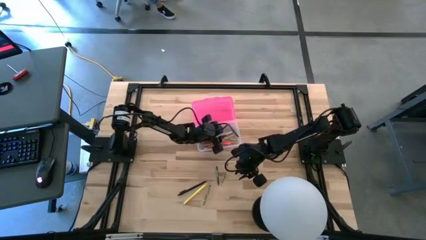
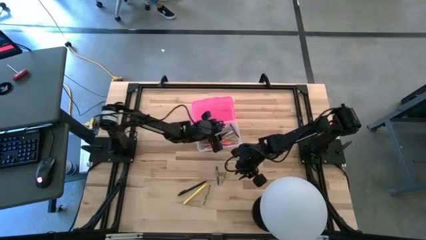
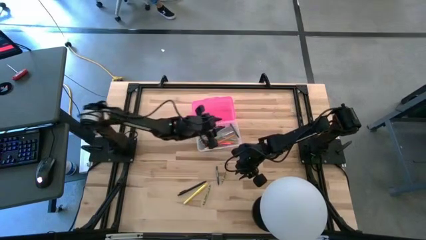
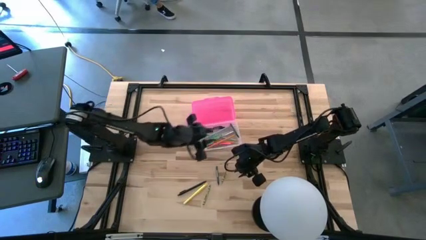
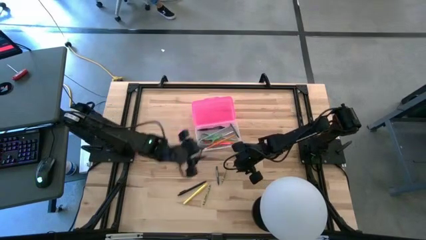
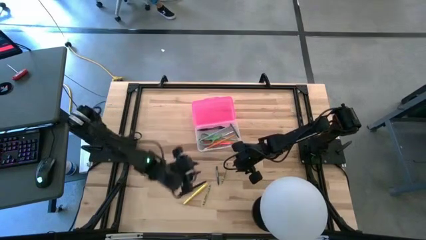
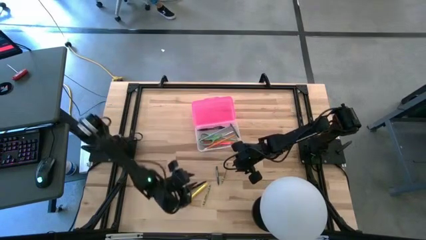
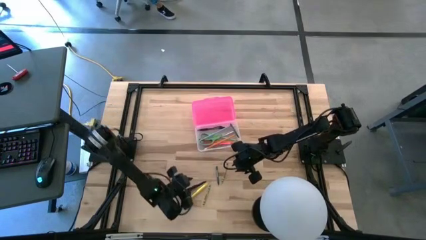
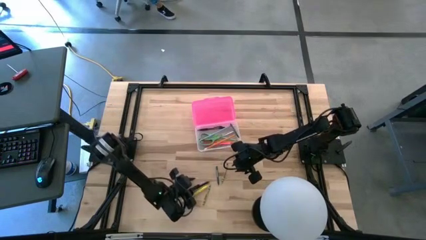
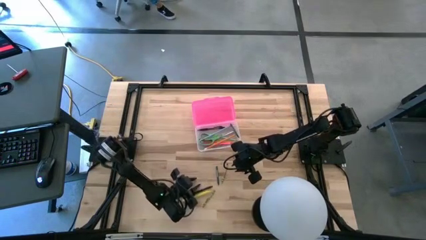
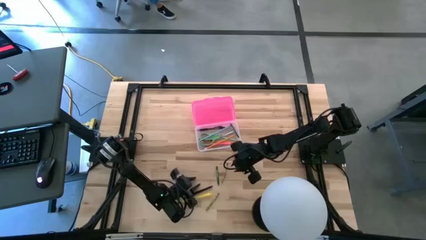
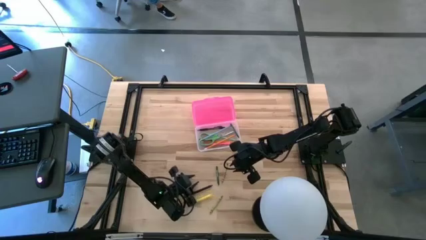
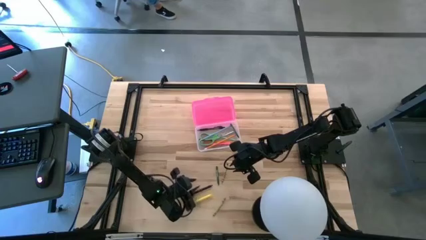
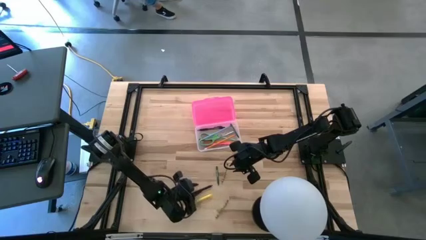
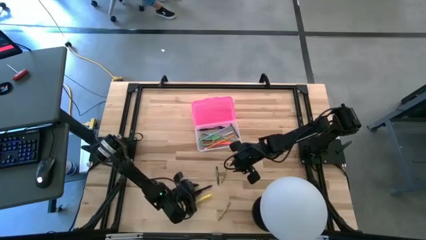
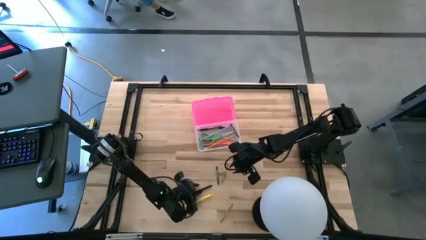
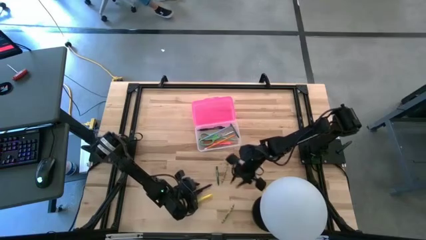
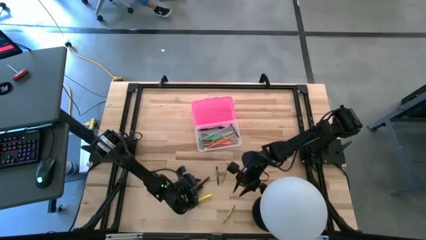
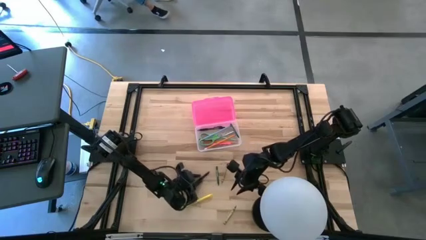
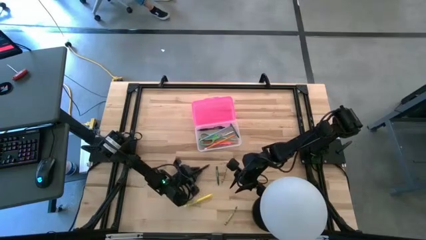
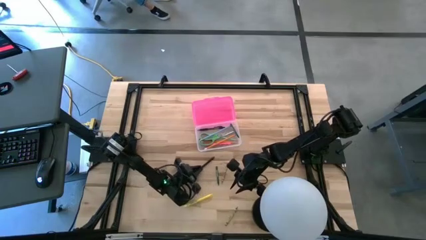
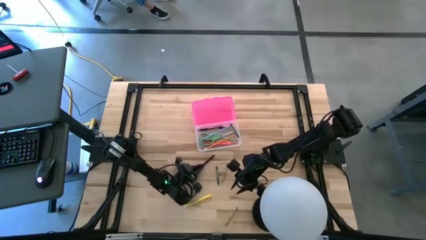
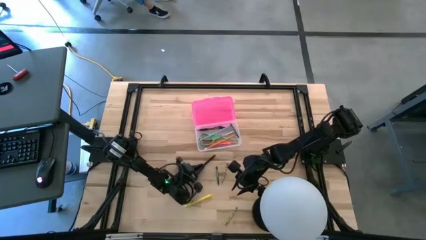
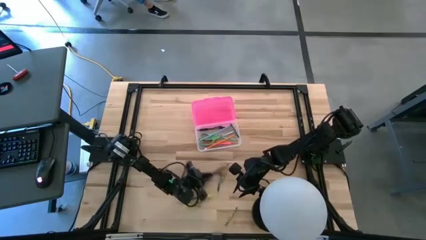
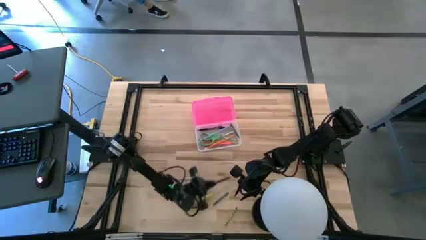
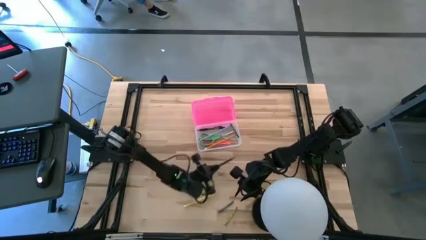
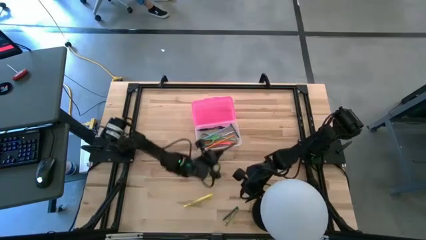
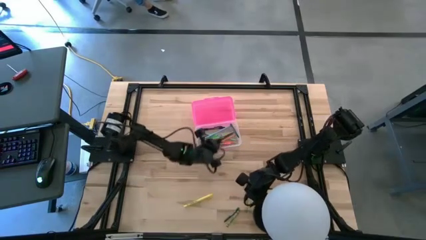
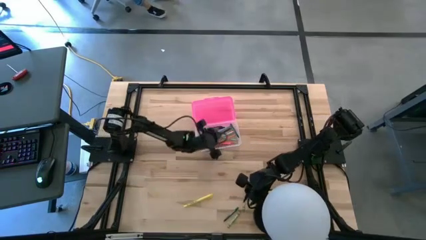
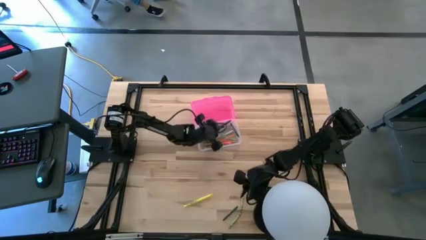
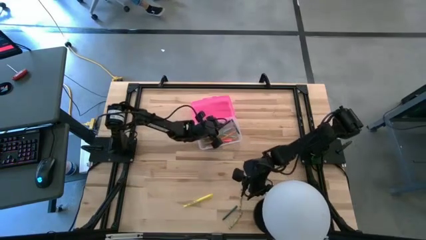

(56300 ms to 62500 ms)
Task: Pick & place school supplies into a supply box
Put the black pen into the pink supply box

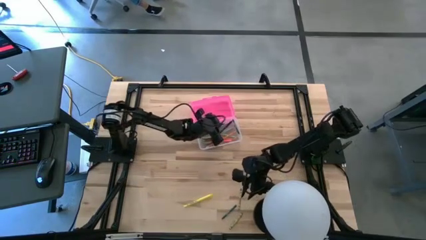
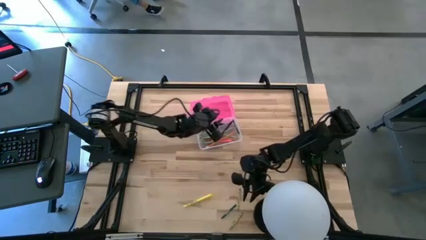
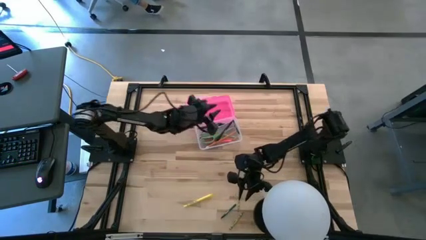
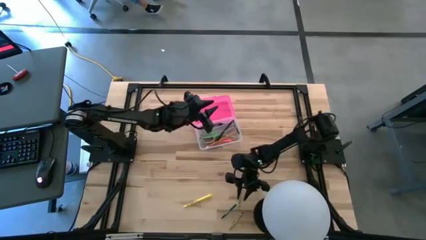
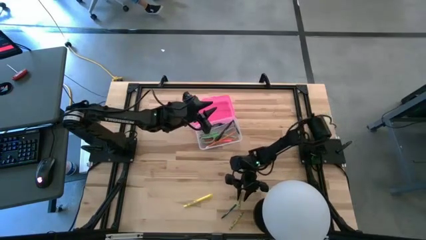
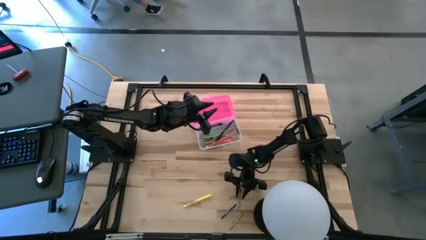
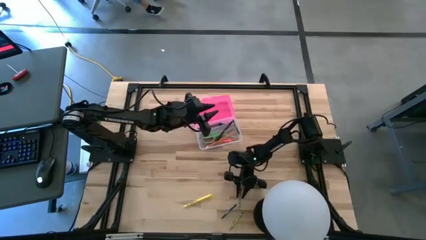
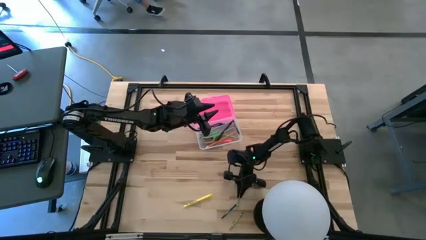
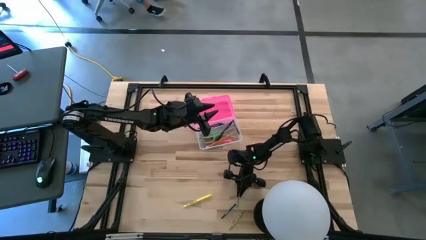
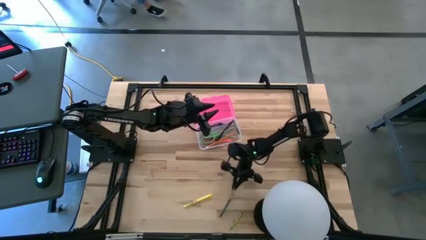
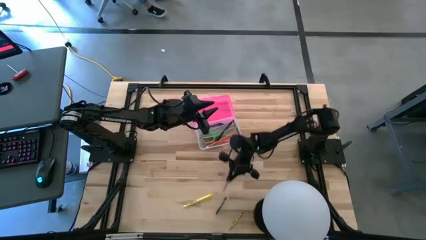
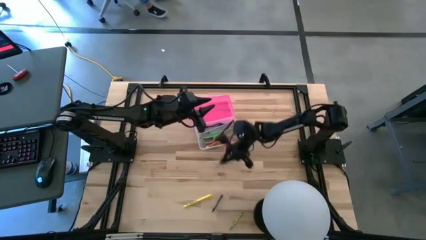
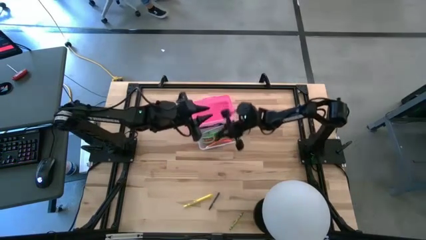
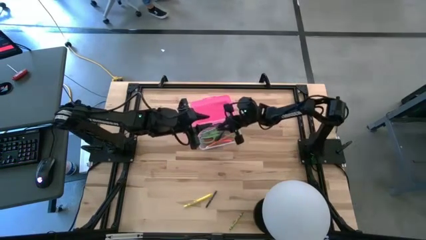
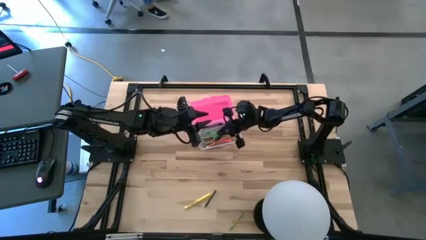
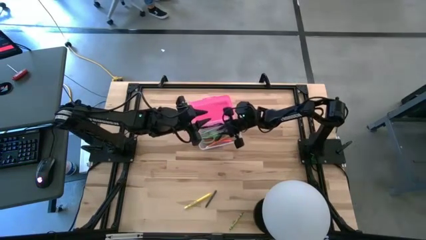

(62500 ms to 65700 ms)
Put the top green crayon into the pink supply box

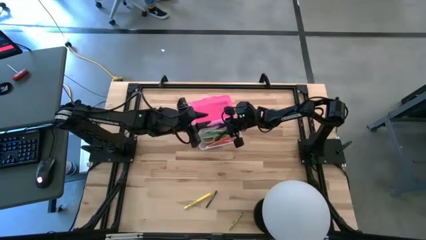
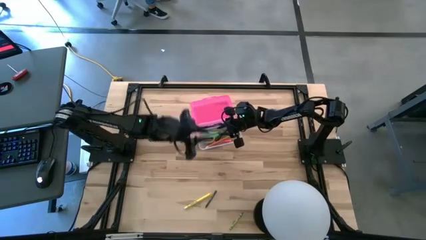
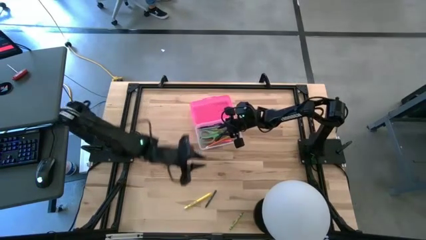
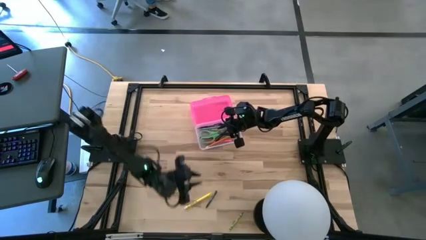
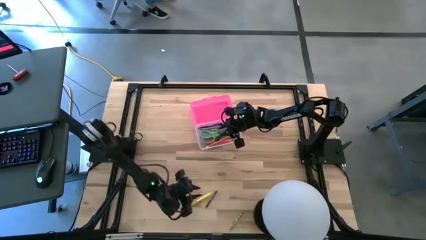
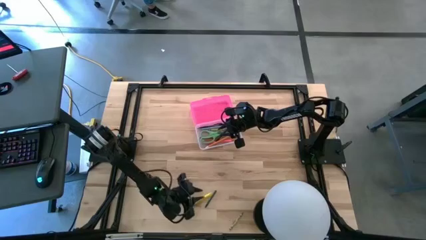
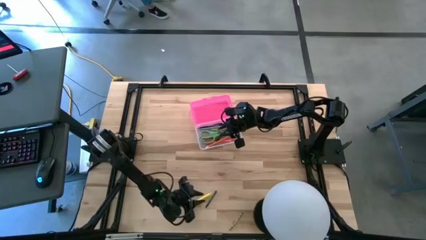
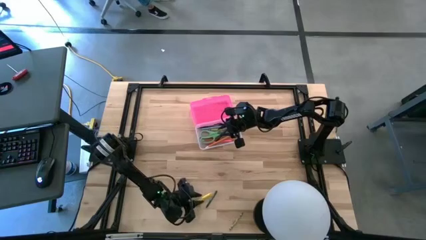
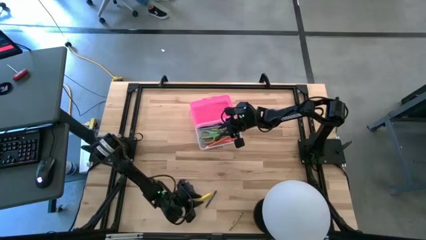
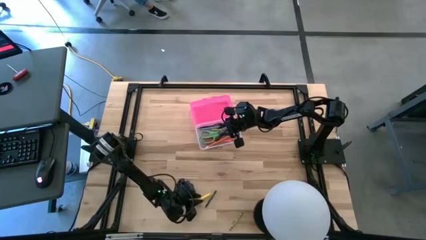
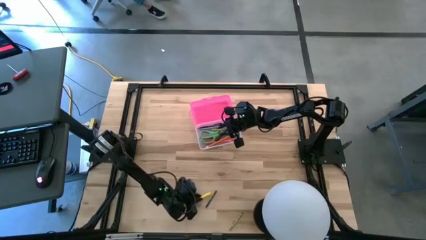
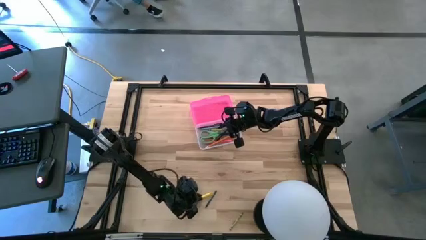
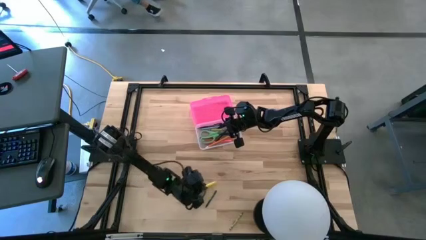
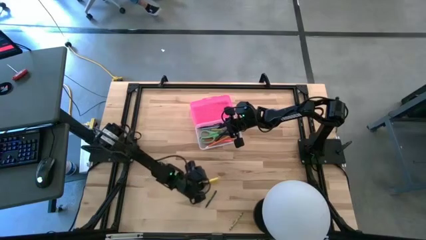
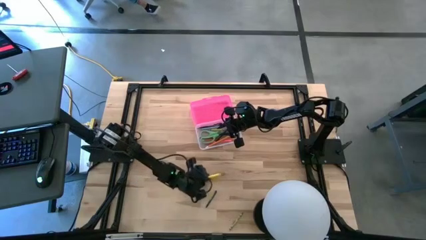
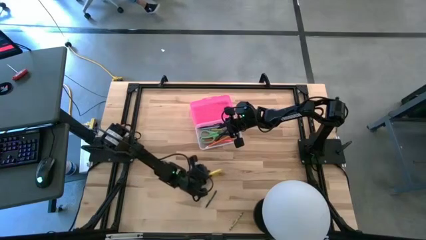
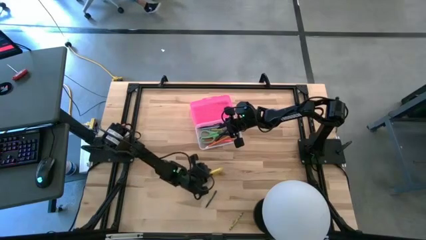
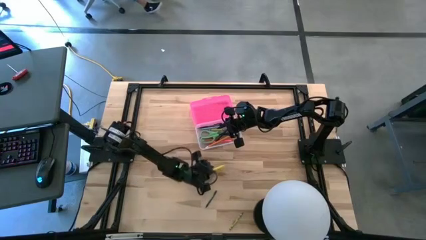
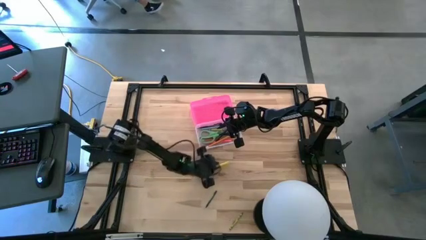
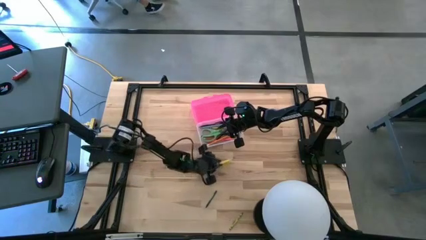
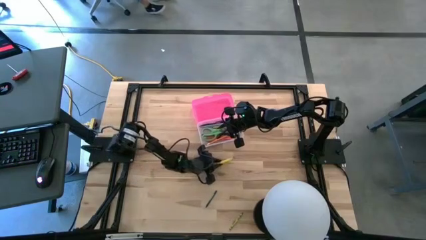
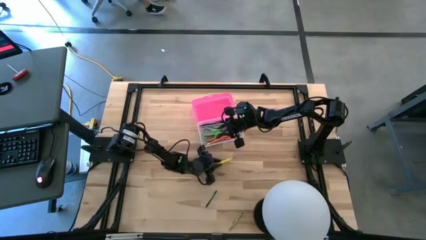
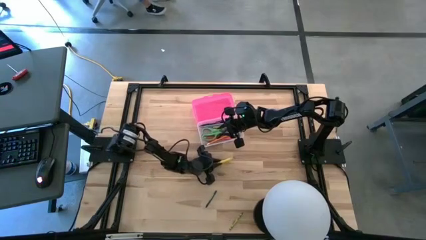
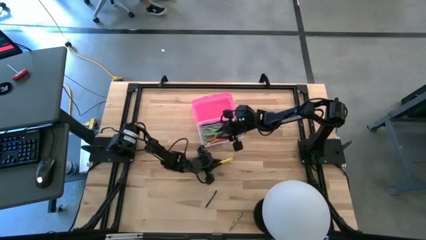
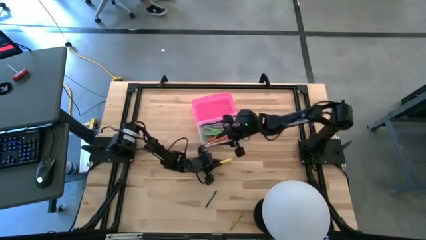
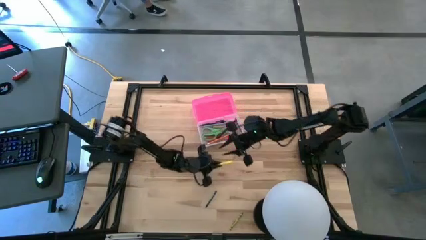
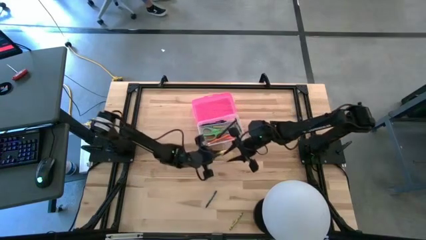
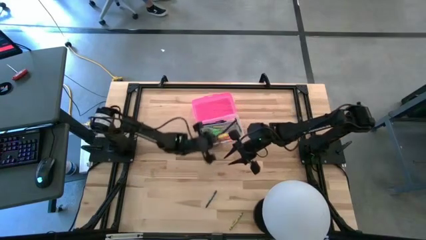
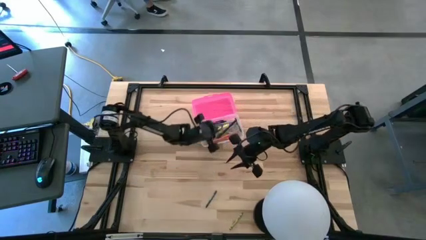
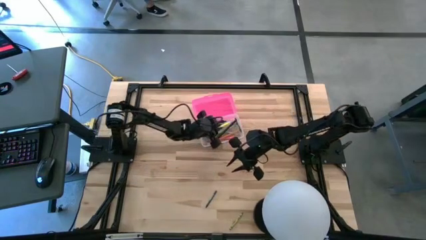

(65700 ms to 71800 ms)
Put the yellow pen into the pink supply box

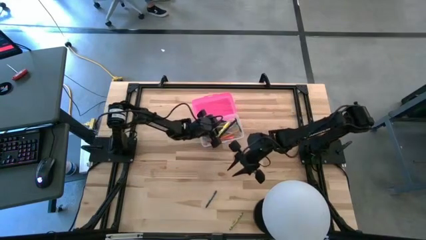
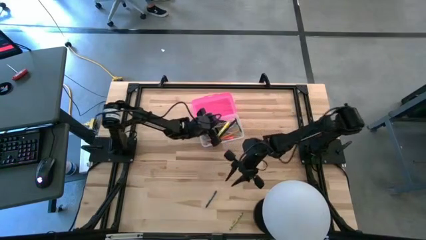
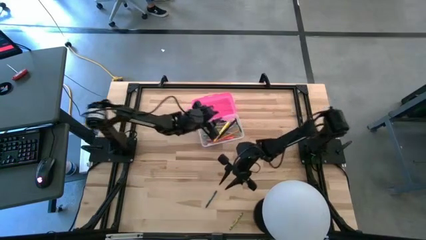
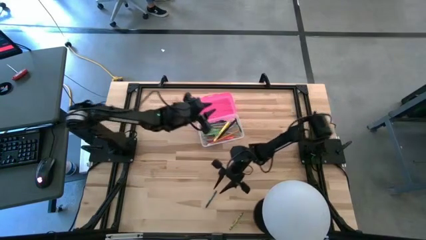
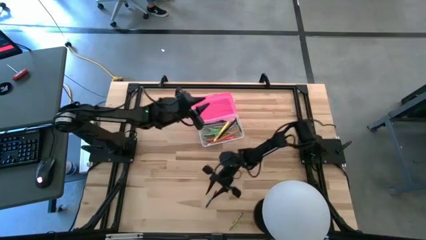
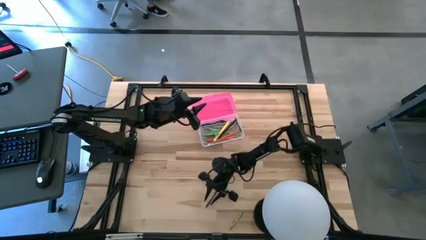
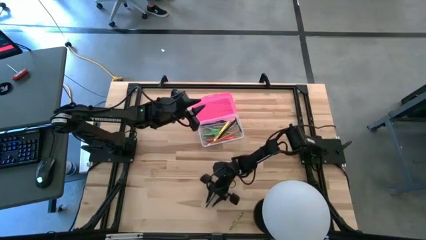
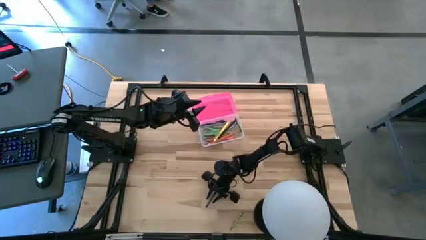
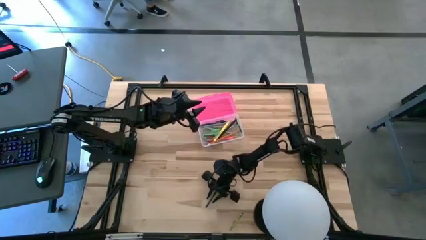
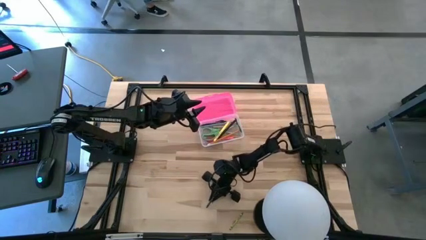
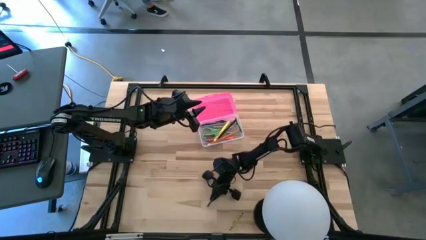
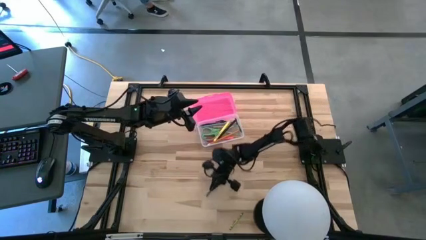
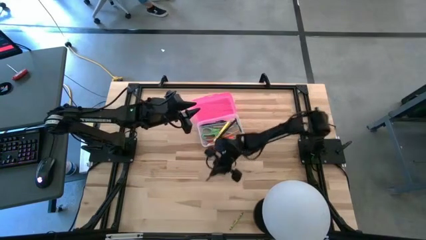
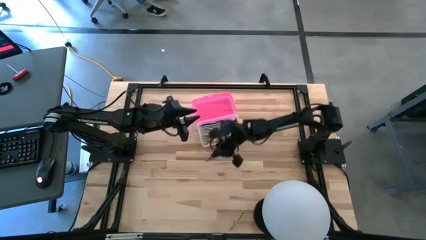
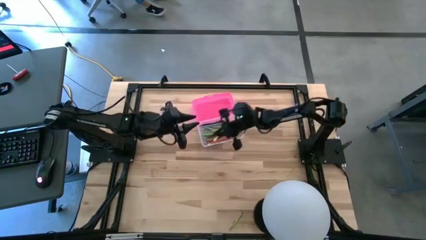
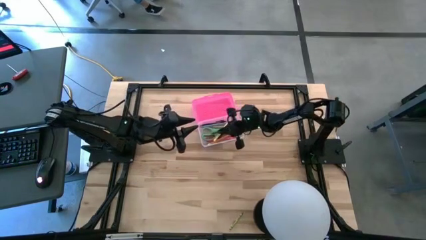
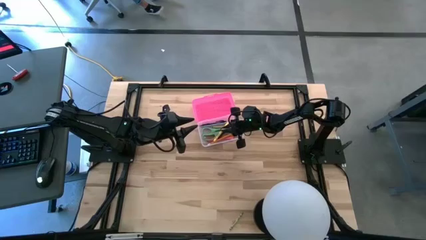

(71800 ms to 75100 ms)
Put the blue crayon into the pink supply box
